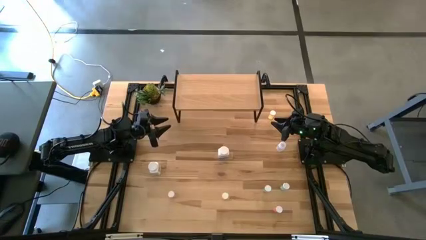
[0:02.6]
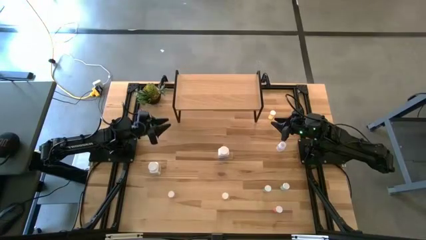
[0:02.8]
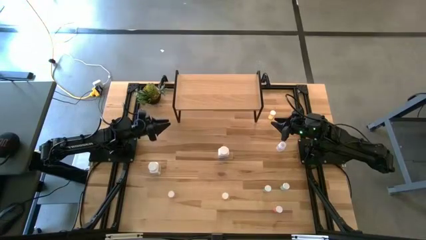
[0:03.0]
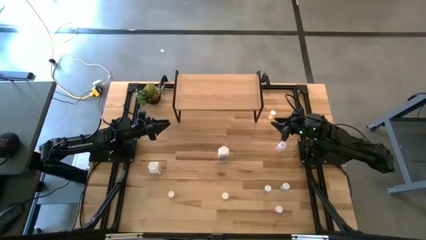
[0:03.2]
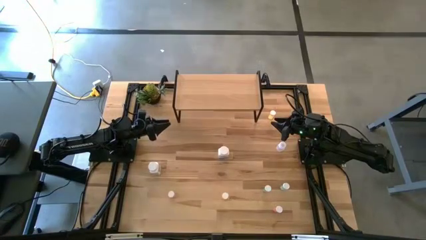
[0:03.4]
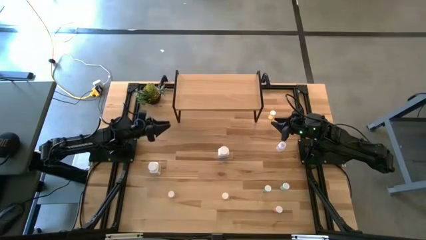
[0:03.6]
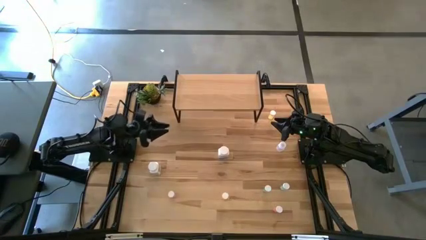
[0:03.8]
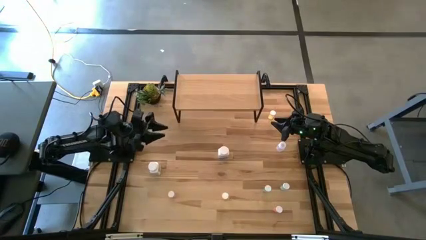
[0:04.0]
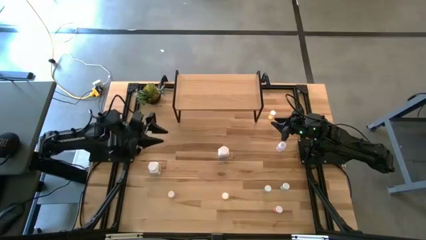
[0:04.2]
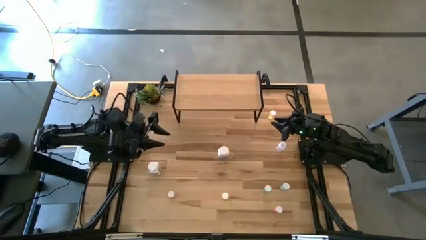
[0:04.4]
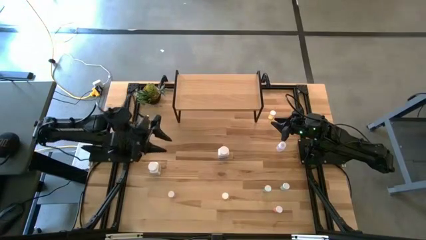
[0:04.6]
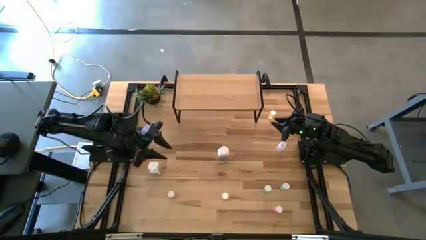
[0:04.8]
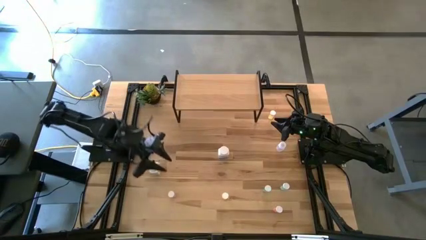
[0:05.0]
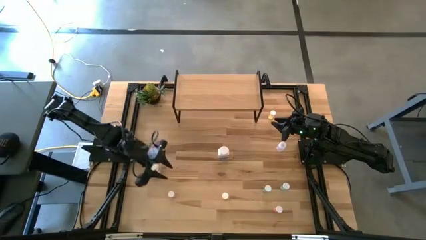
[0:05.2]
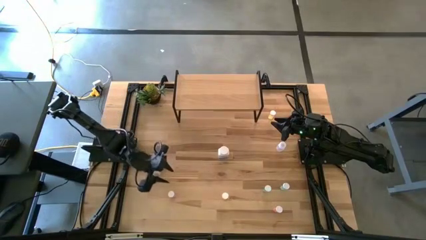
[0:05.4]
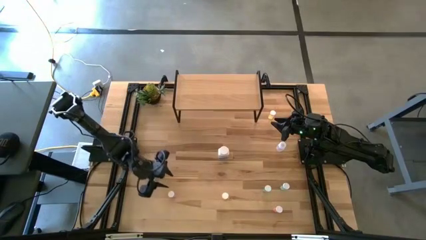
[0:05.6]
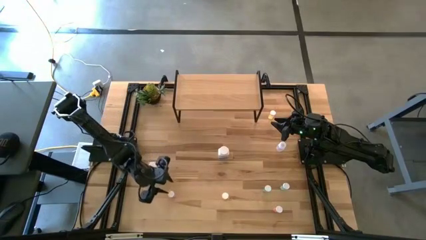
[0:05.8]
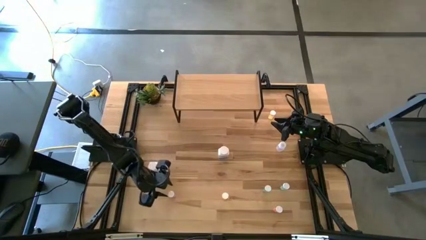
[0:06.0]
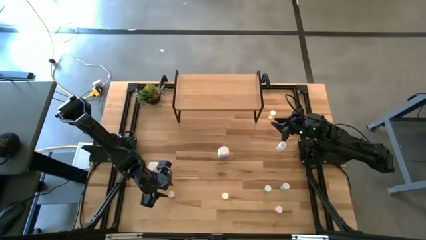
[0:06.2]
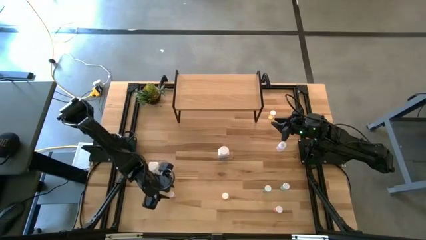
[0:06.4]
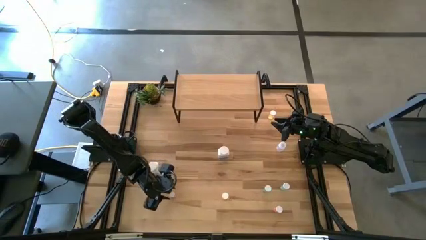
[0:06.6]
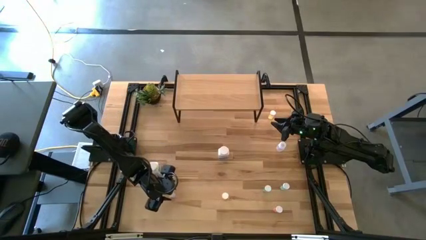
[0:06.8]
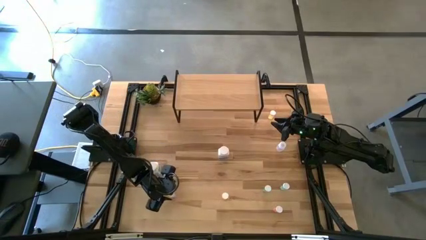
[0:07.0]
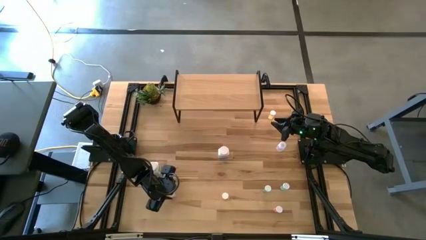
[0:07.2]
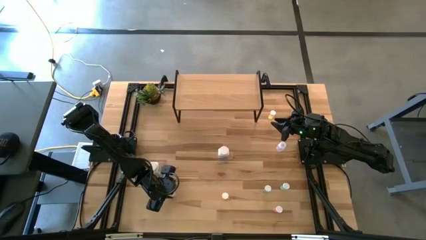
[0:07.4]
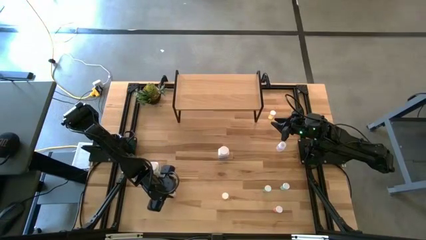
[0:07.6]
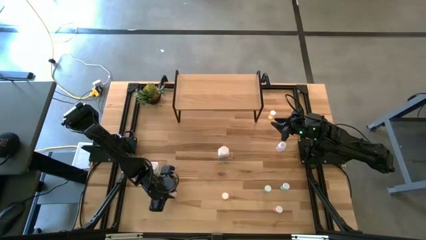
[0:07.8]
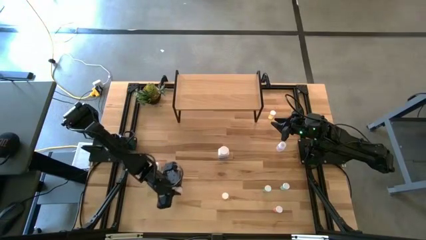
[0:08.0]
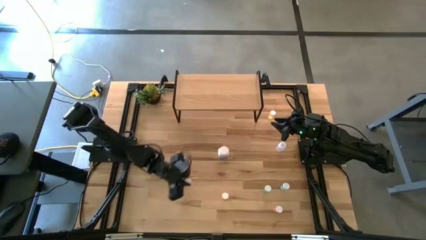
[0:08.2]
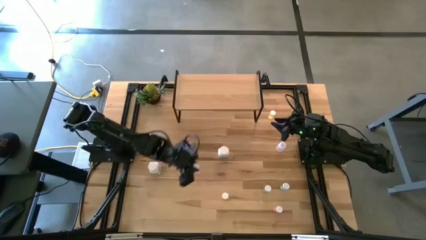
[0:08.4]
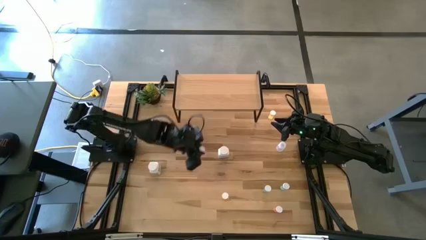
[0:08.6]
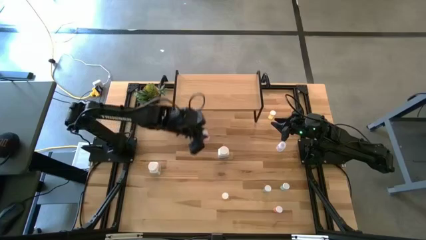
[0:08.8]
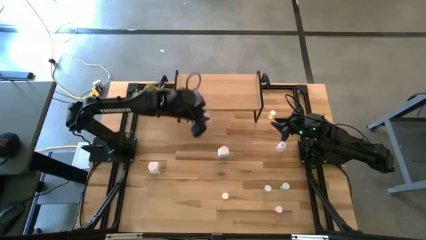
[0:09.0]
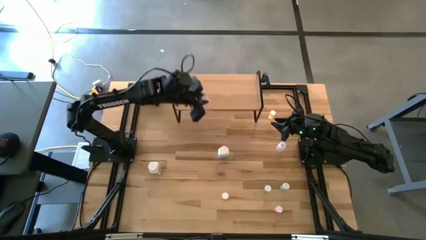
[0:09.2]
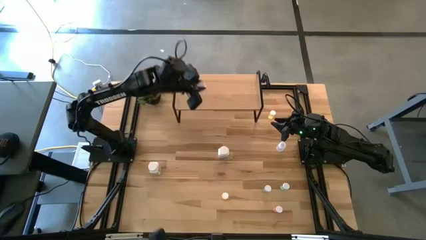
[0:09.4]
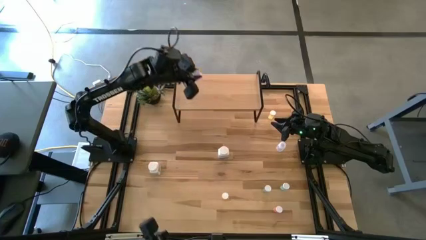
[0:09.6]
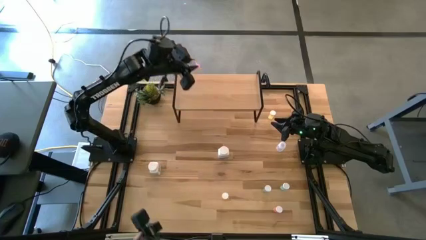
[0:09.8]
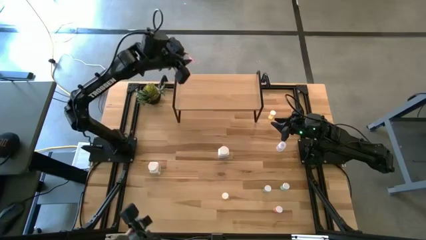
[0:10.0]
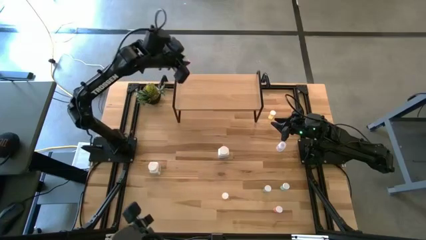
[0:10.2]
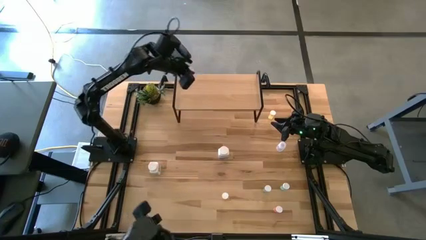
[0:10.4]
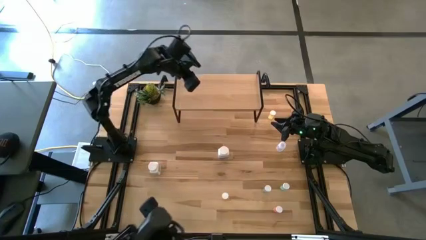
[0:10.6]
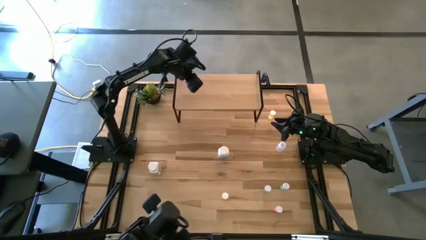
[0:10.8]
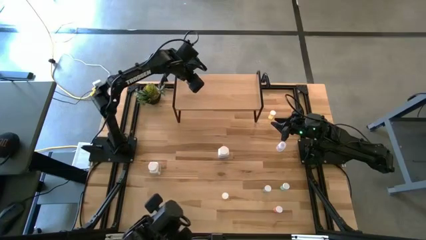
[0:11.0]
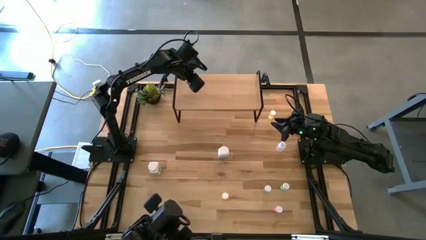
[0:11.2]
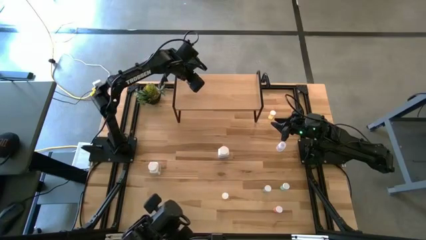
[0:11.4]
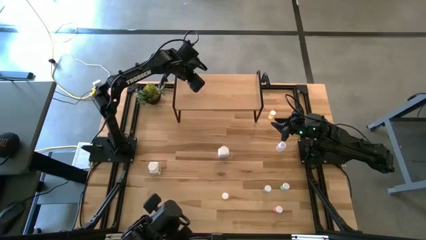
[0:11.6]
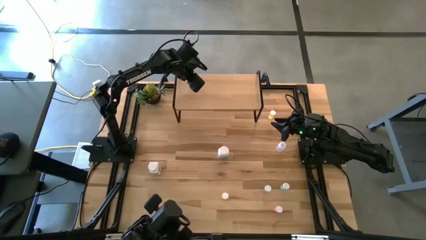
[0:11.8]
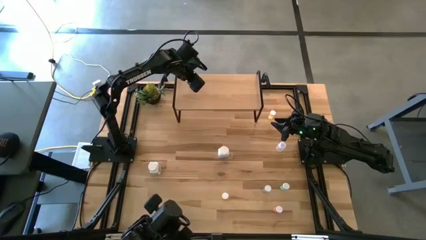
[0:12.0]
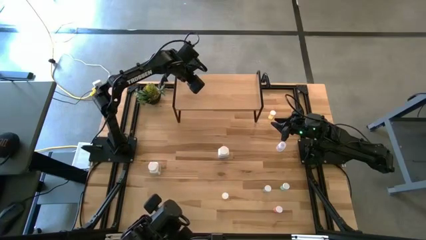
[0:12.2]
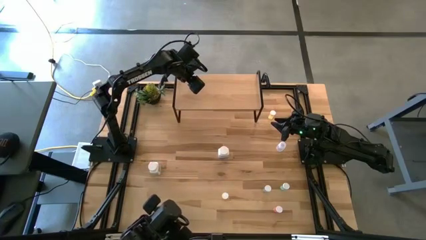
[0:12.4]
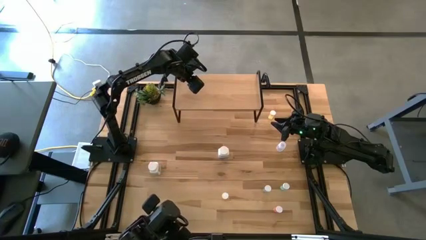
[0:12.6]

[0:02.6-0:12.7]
Task: Pick and place medicine bottles onto shelf by color
Put the pink pill bottle on the shelf

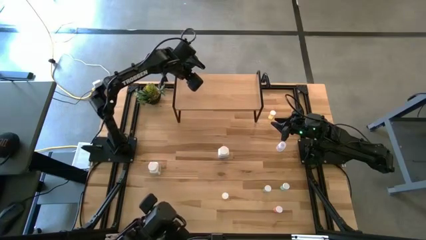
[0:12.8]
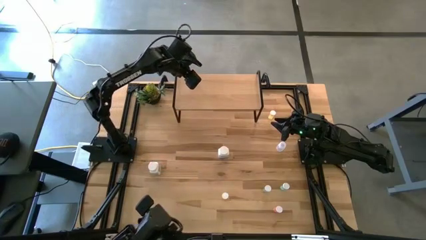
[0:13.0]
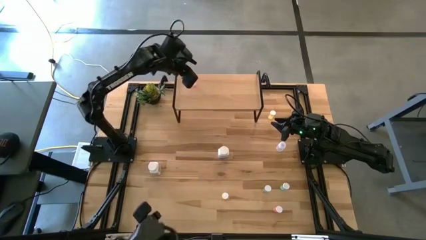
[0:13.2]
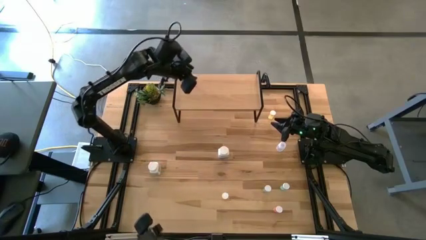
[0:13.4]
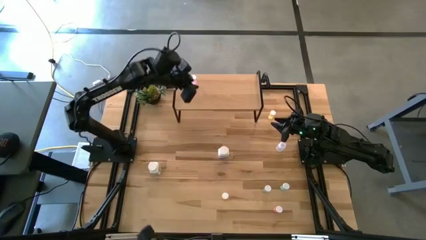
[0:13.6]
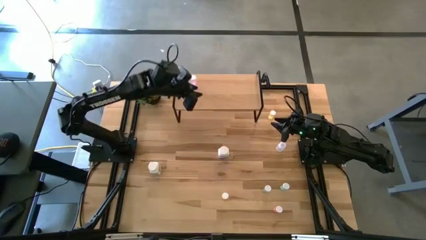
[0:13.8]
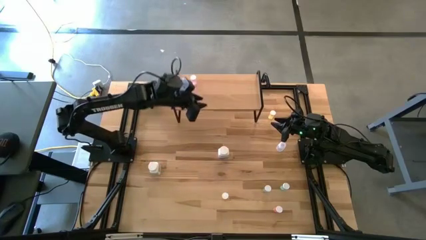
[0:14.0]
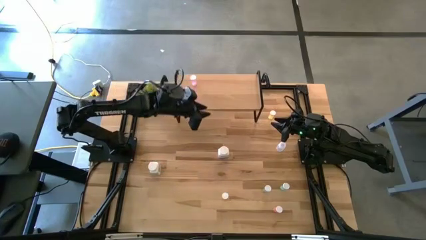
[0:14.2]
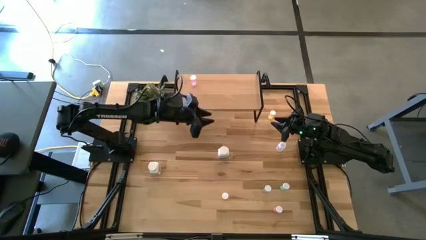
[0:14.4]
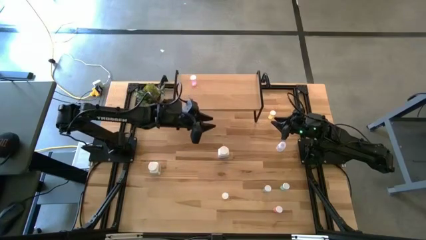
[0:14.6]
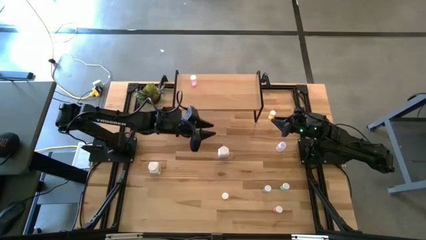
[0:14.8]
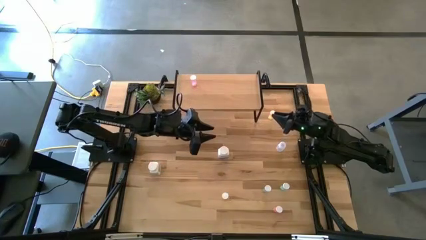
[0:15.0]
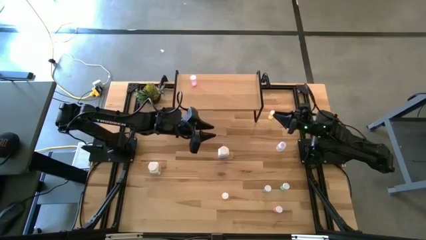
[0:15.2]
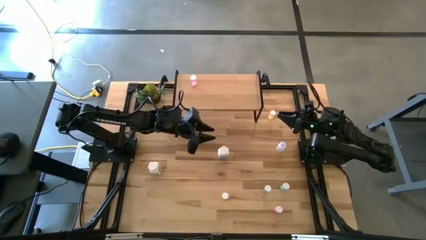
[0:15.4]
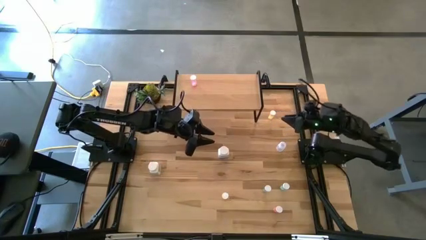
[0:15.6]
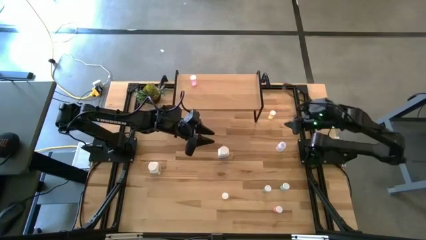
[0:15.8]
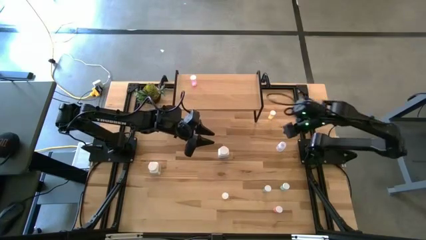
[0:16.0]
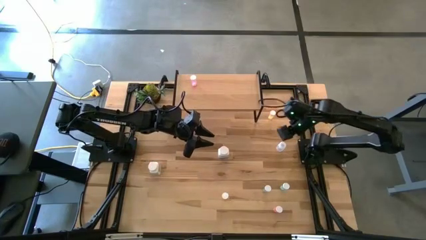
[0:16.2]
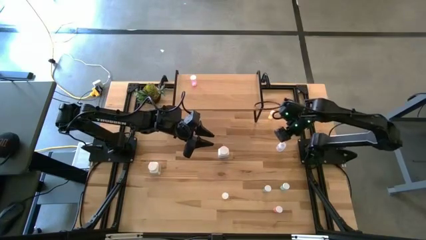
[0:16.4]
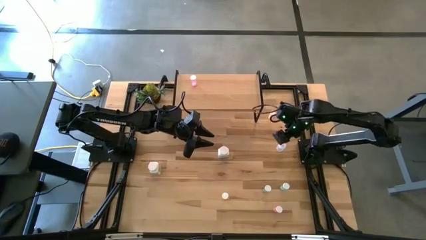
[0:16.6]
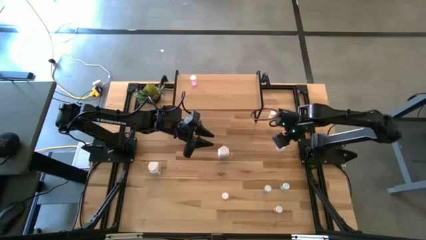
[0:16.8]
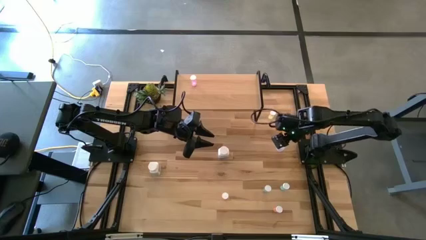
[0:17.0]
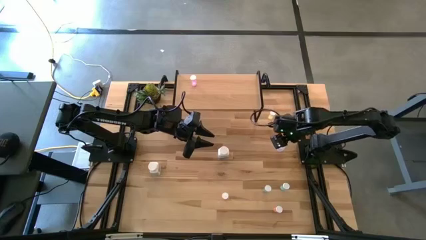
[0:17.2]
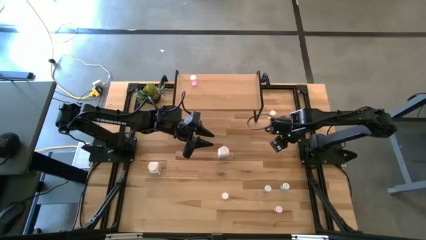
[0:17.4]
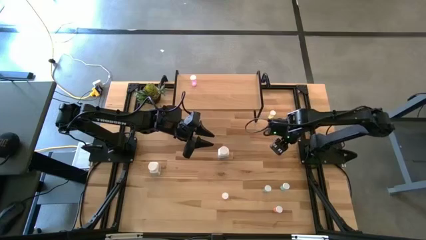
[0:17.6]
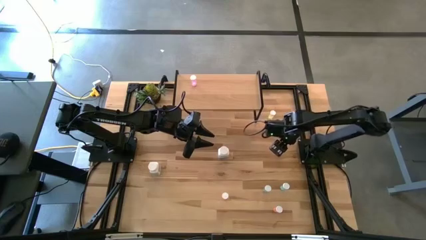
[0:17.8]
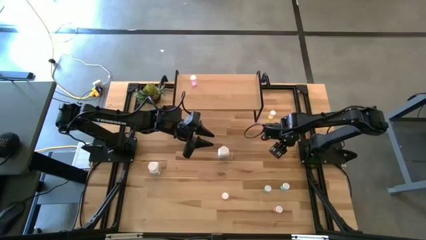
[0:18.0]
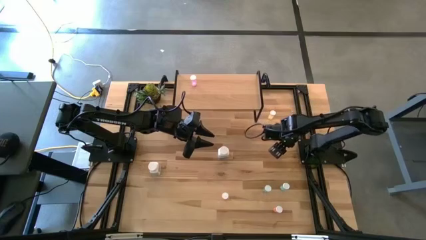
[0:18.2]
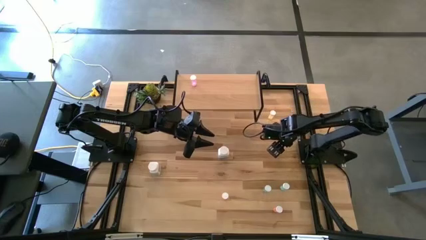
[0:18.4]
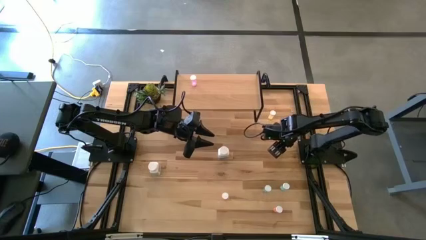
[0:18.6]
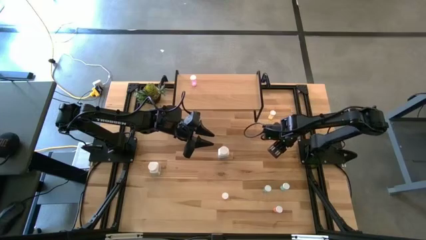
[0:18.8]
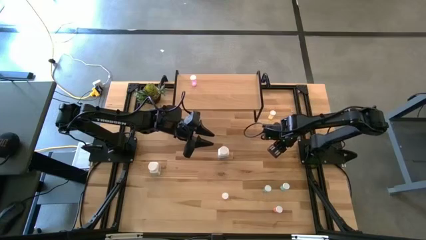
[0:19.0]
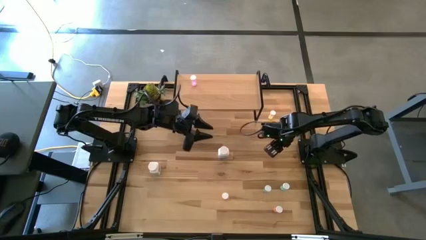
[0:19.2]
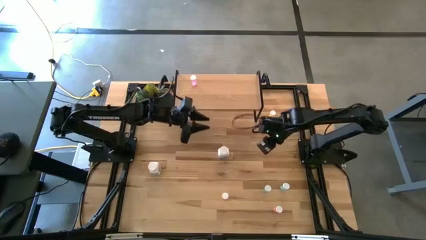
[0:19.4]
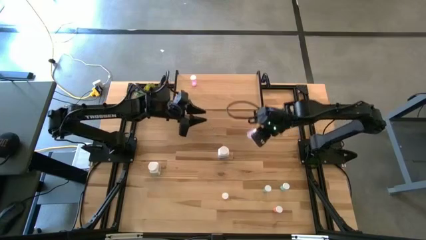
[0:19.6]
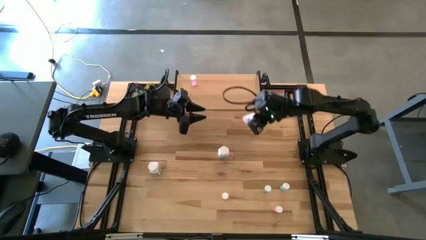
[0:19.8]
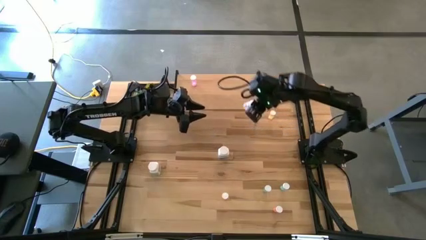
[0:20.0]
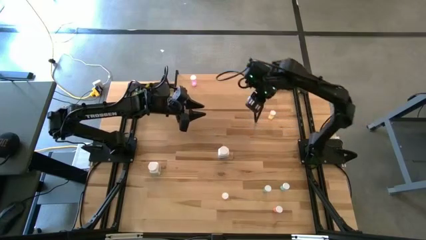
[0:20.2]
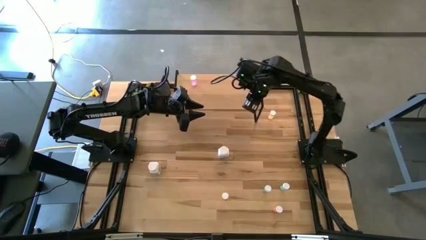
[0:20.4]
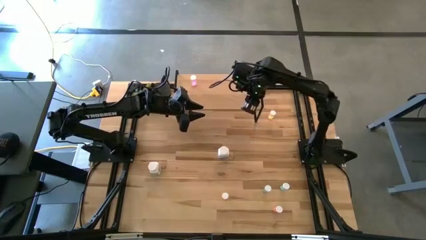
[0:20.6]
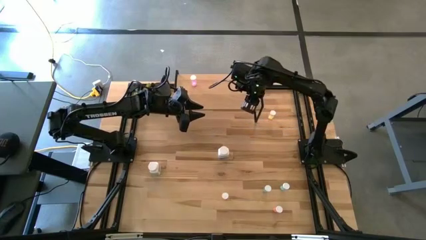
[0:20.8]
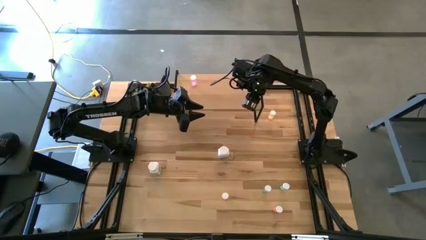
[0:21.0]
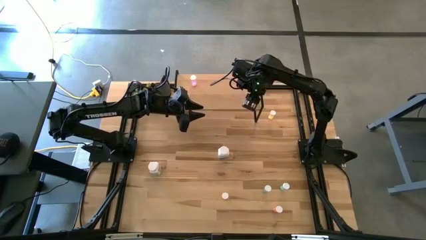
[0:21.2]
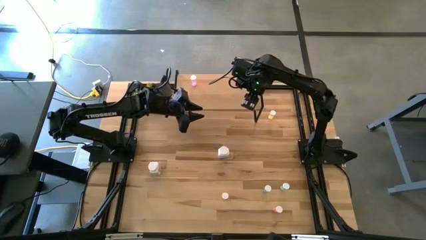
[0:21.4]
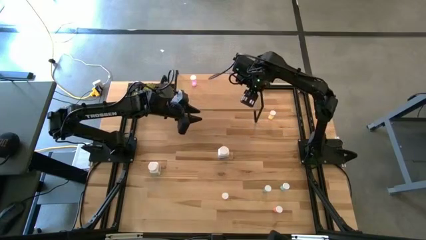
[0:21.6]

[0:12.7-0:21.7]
Put the white pill bottle on the shelf
